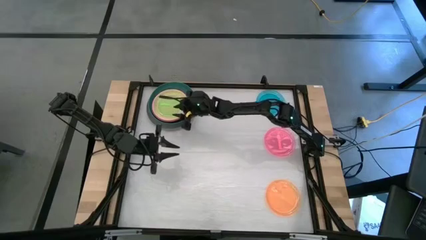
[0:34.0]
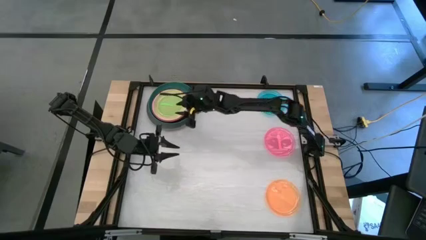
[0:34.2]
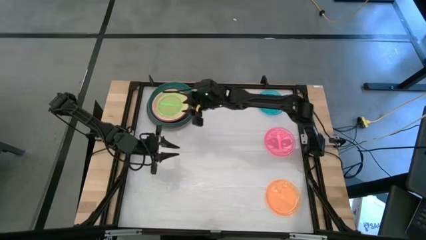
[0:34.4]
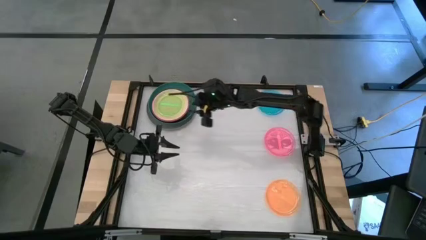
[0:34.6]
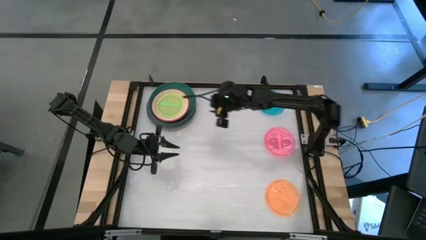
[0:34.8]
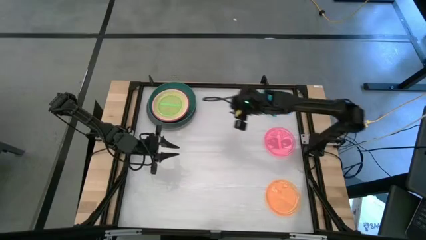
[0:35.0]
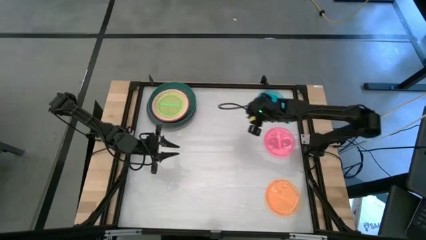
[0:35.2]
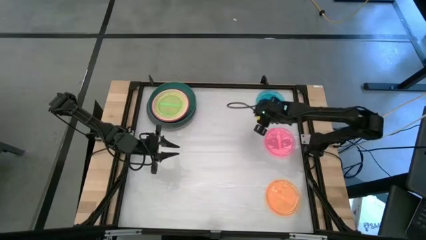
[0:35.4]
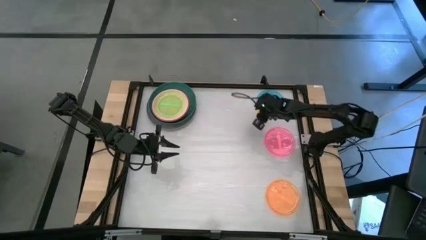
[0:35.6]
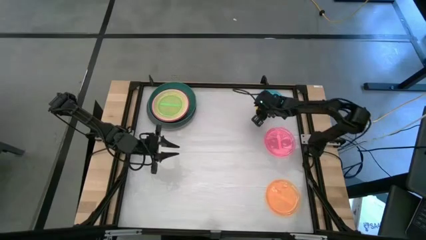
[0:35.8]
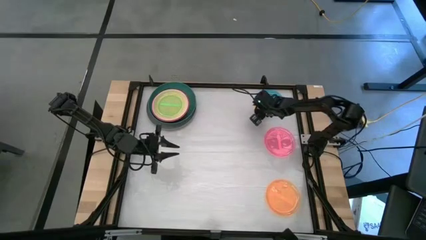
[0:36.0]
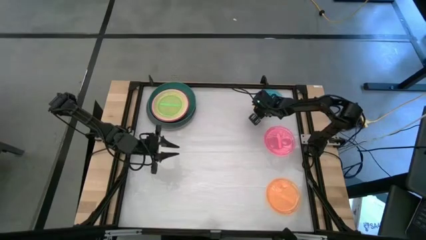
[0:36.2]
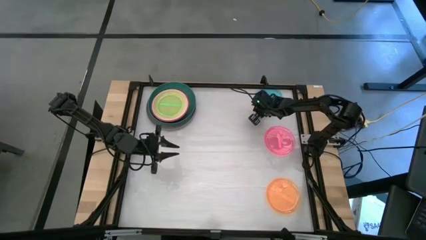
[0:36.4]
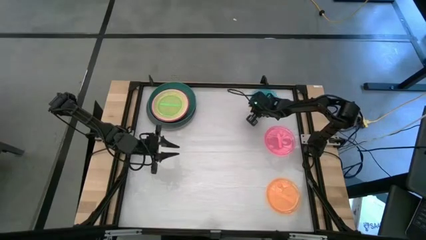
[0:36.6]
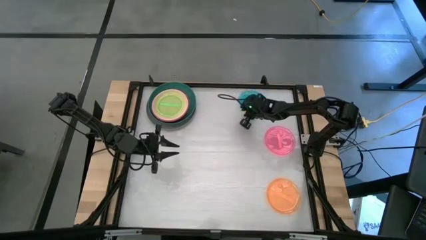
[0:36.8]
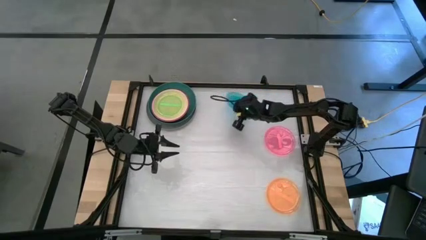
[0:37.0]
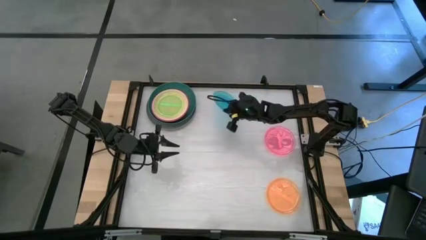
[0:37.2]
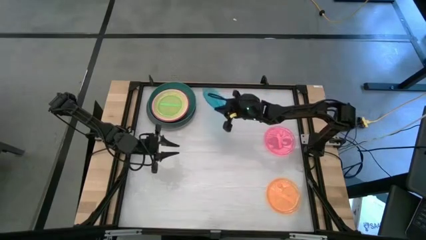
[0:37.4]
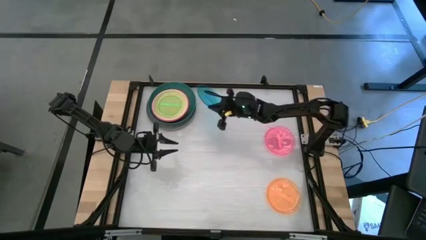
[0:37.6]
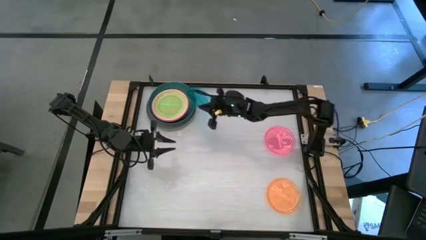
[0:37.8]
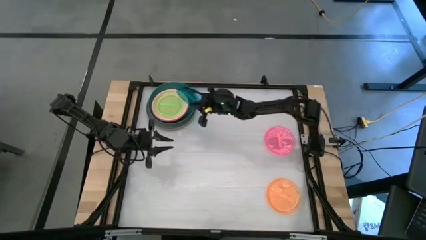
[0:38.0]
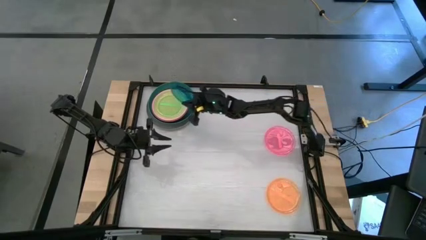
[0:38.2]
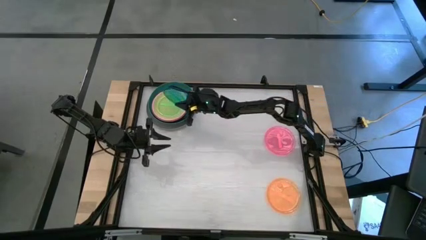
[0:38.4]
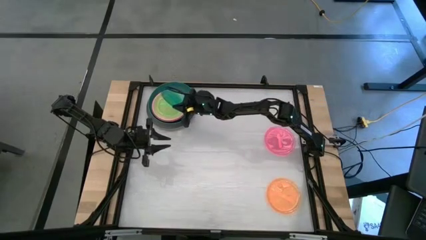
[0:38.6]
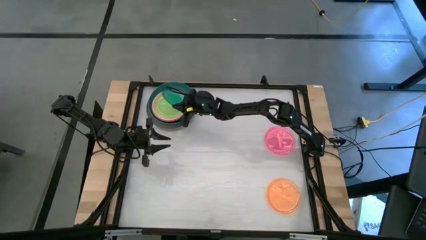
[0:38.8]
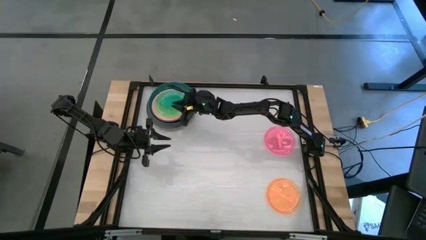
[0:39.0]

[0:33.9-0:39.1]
Task: Stack plastic plates
Stack the light blue plate on the light green plate

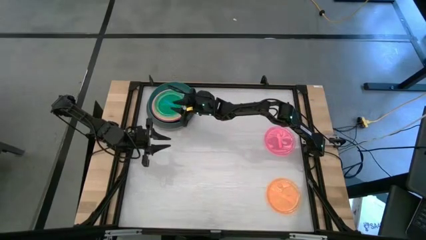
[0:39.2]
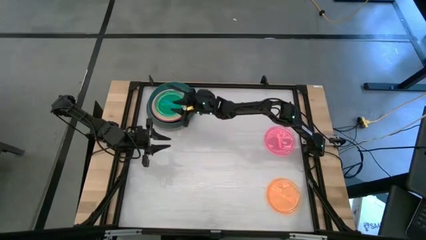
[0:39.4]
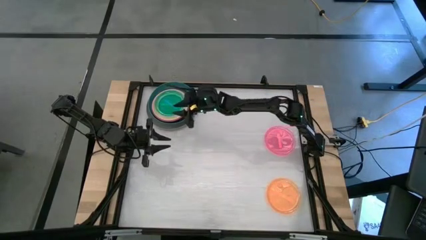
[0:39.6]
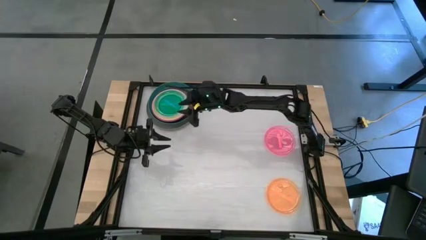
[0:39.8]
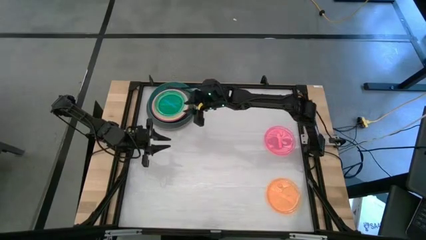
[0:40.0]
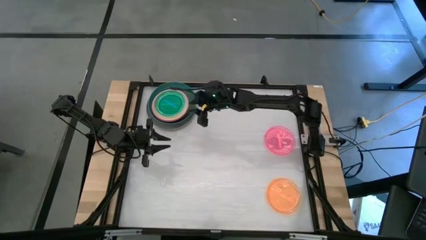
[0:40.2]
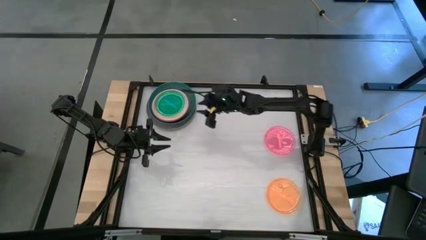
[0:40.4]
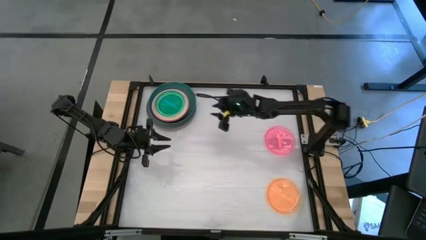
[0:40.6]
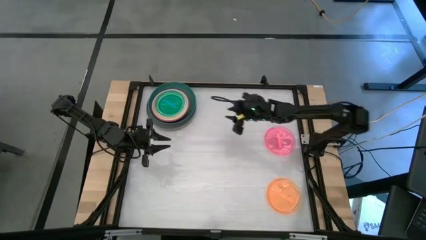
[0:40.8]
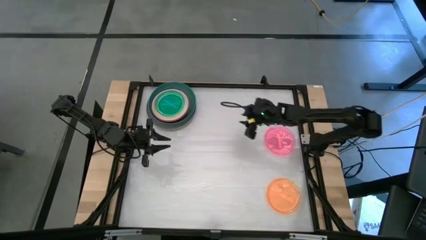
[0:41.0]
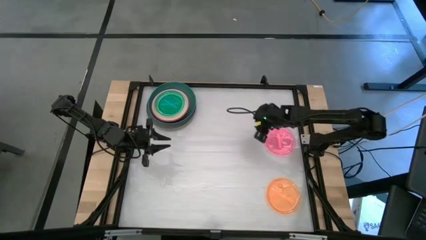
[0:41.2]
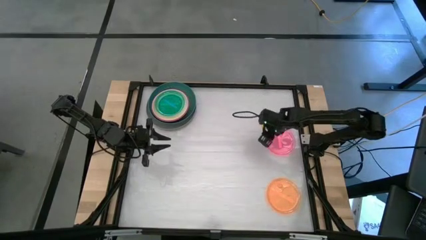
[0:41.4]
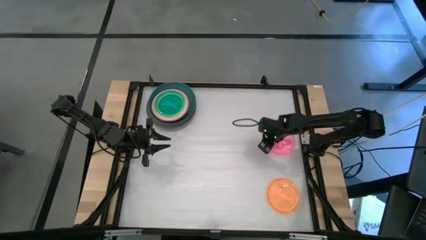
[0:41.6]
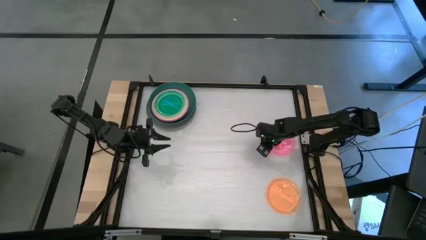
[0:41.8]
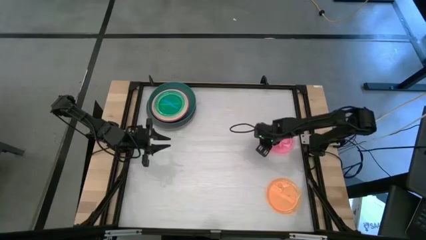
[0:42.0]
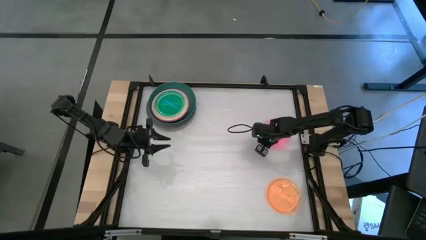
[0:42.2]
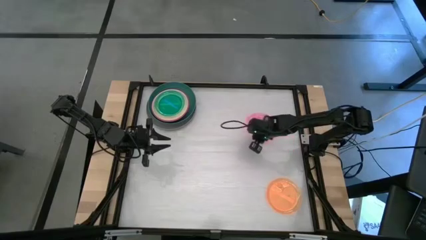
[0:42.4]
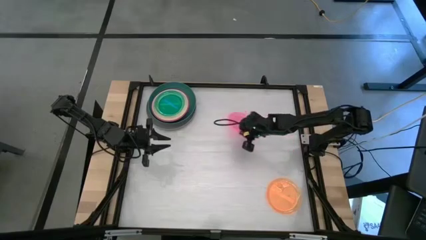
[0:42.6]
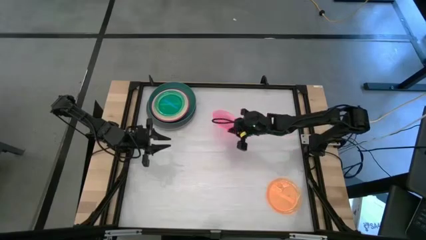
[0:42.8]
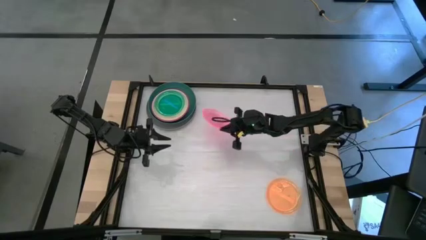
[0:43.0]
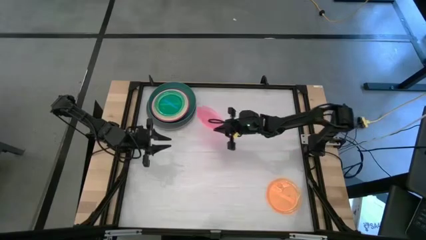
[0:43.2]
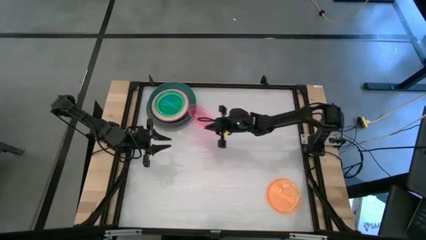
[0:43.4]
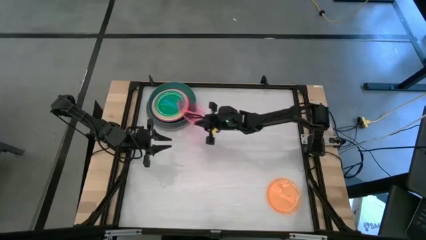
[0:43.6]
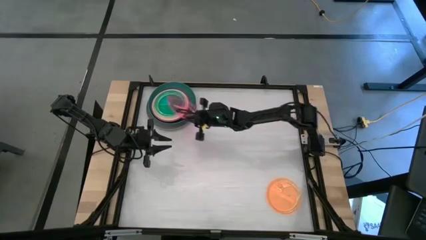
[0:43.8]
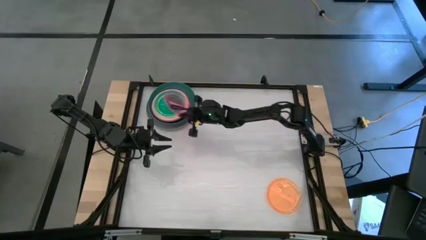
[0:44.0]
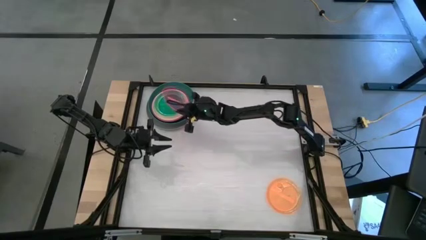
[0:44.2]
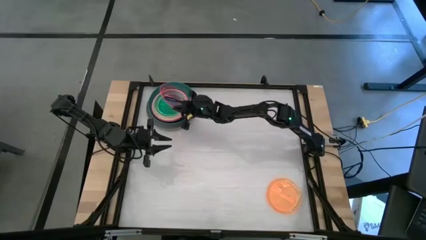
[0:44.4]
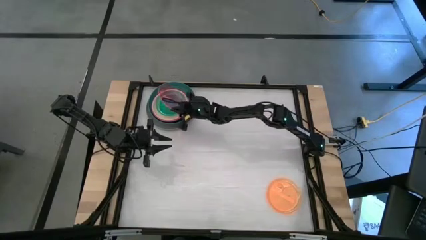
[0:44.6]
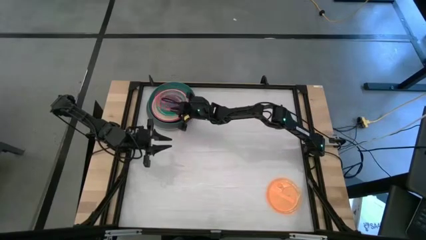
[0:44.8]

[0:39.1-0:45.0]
Stack the light pink plate on the light blue plate

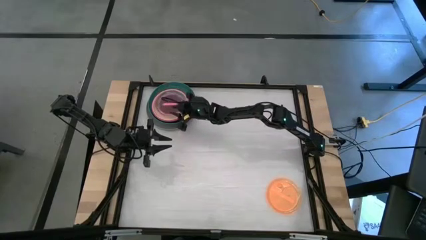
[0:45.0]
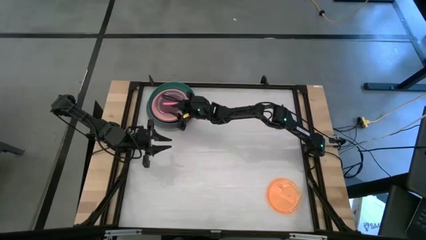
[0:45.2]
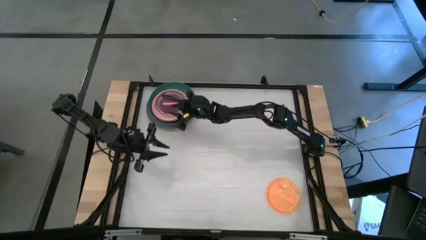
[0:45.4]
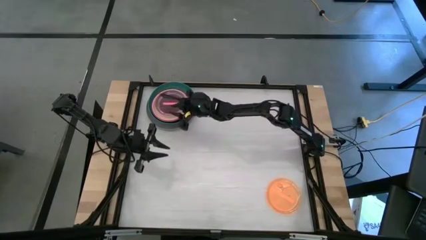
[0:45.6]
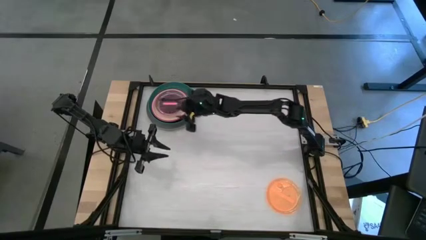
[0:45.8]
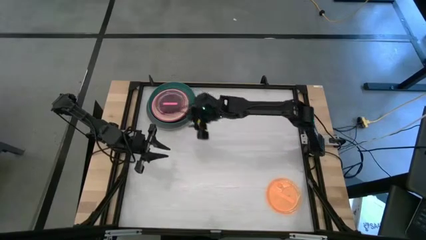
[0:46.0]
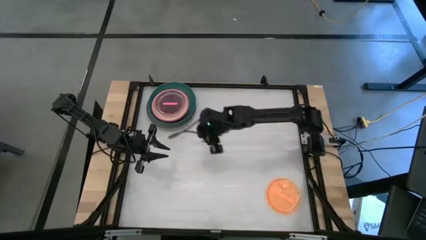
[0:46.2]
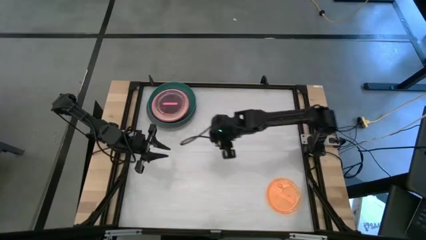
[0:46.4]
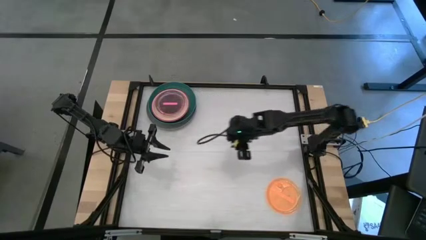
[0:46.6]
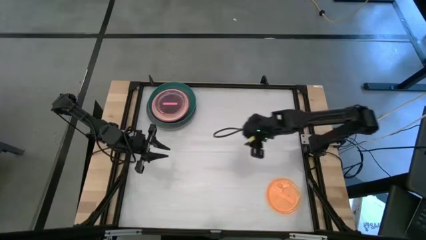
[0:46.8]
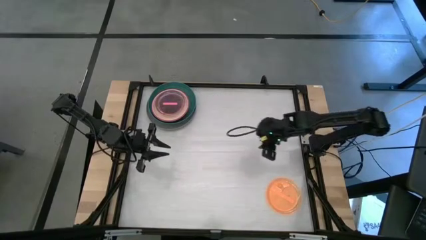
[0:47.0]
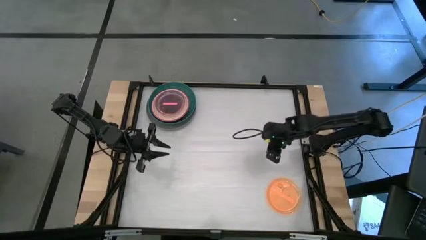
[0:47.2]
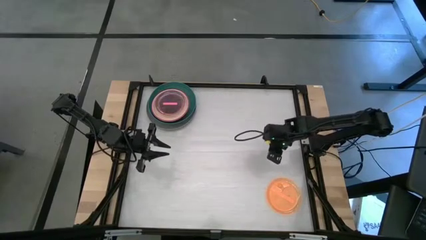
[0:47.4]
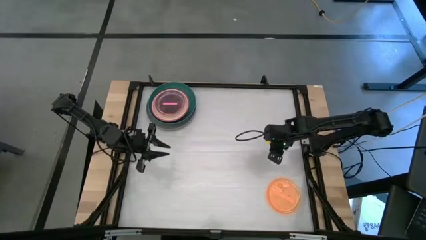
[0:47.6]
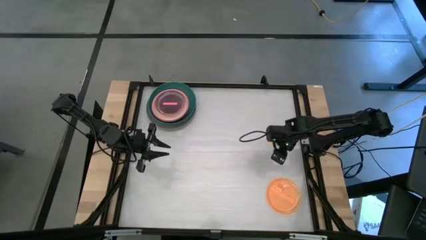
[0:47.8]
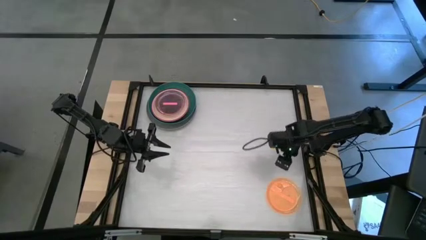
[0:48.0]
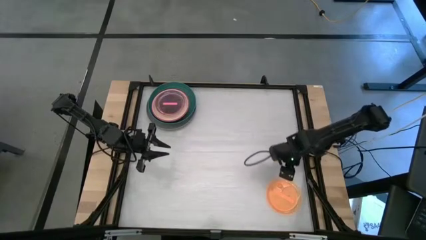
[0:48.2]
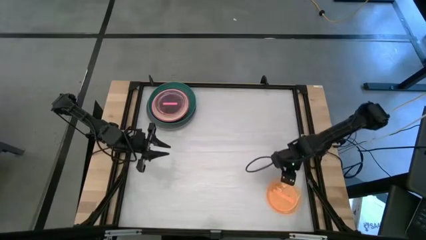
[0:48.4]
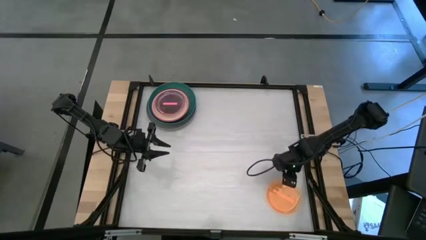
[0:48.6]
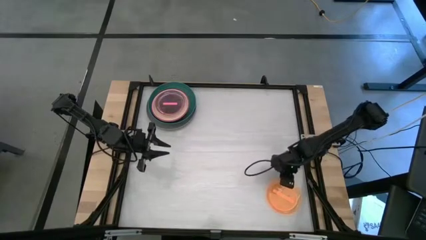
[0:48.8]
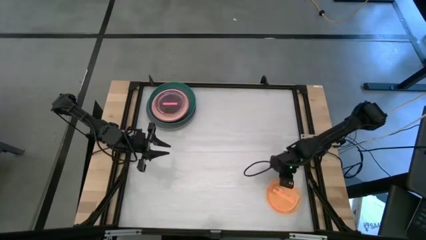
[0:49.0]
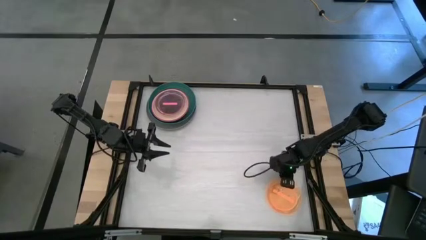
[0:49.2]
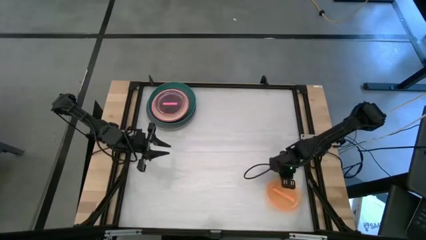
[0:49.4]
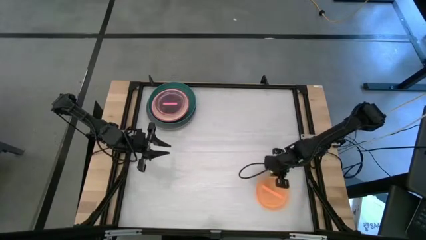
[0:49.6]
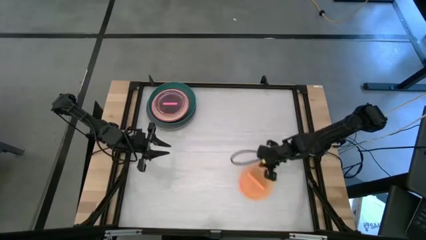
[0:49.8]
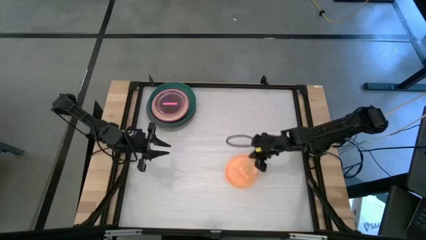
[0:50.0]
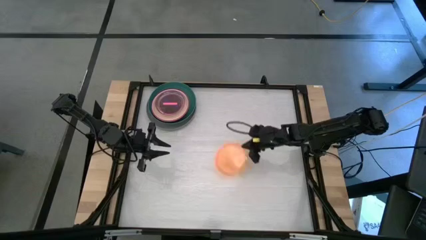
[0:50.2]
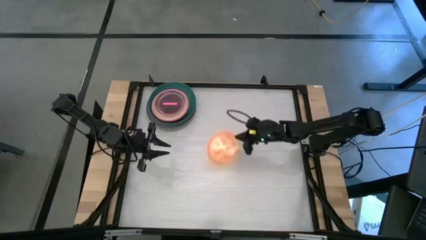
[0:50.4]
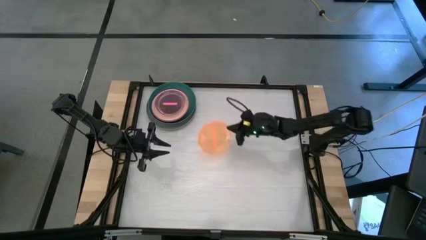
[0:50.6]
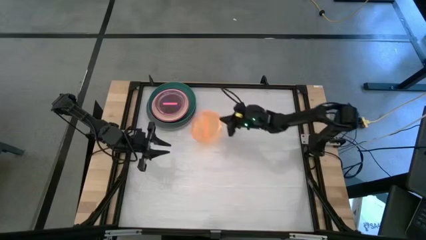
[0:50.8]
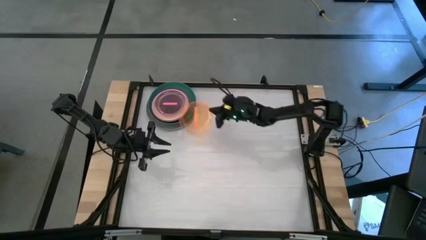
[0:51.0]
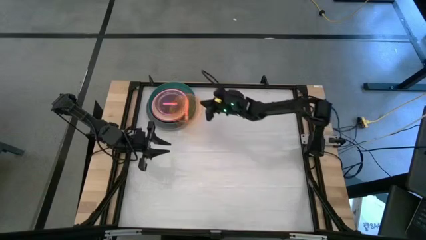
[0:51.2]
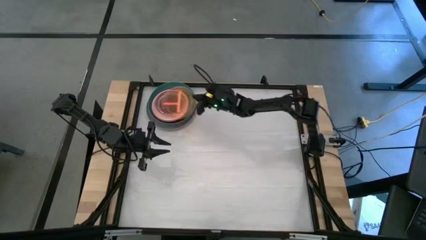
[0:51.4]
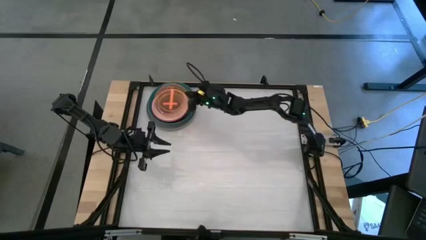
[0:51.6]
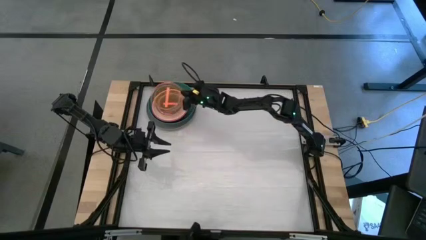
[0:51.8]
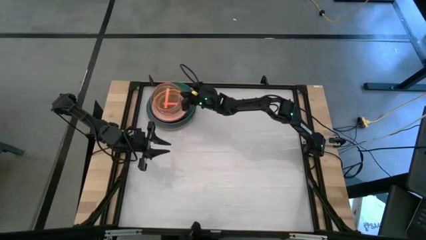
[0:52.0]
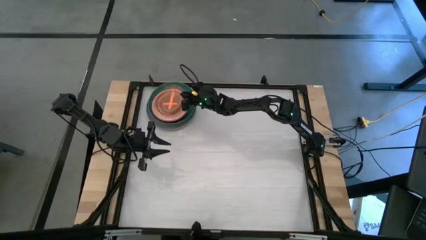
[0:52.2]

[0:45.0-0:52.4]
Stack the light orange plate on the light pink plate
